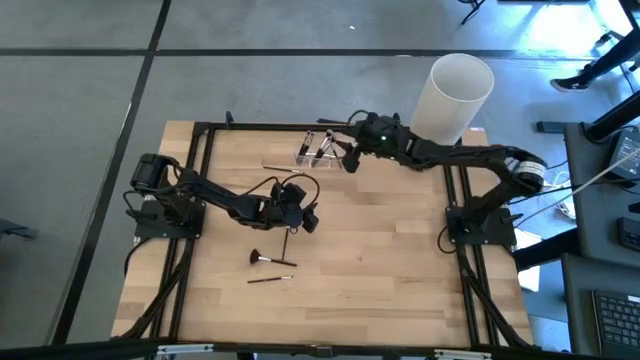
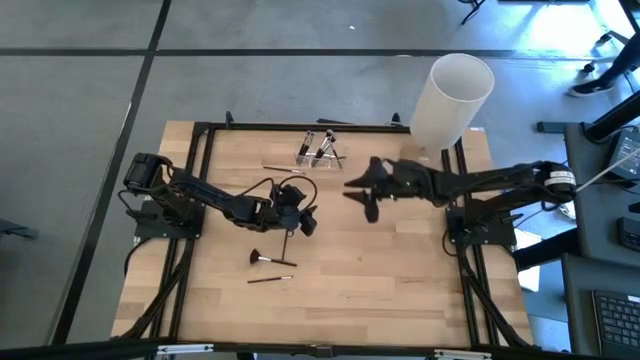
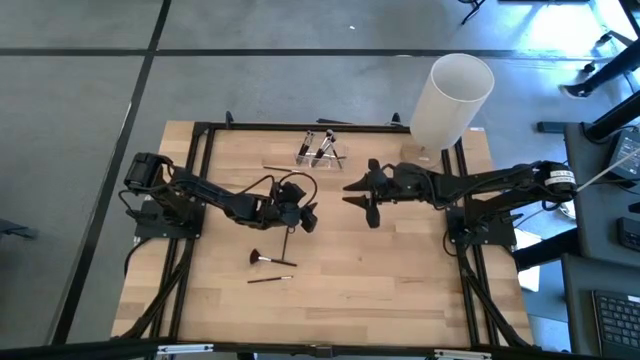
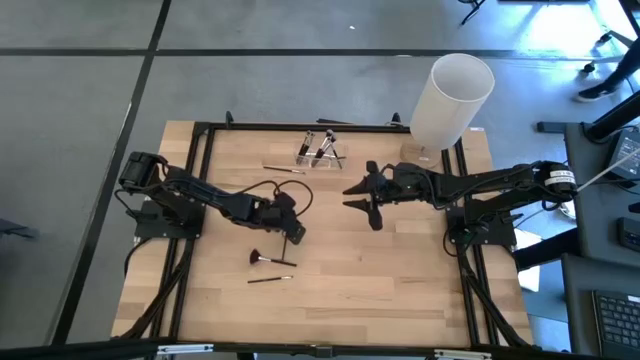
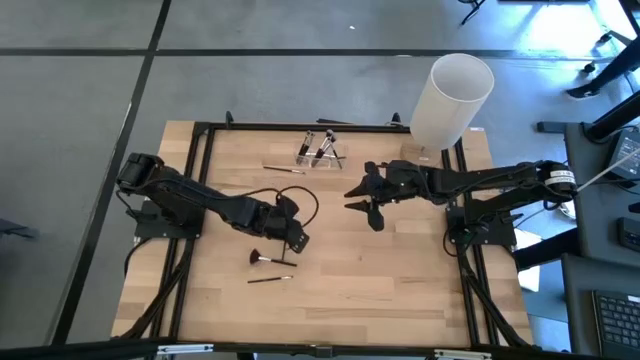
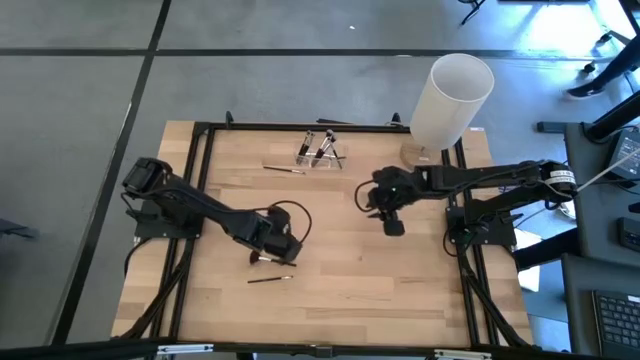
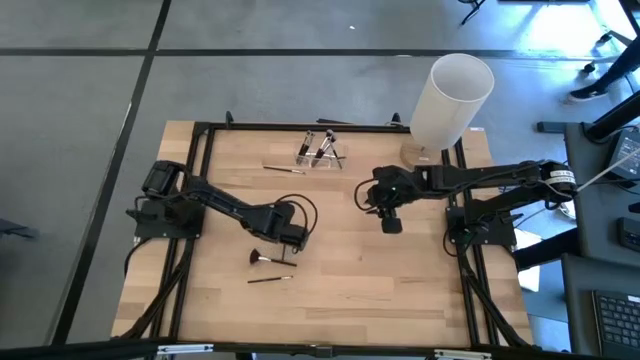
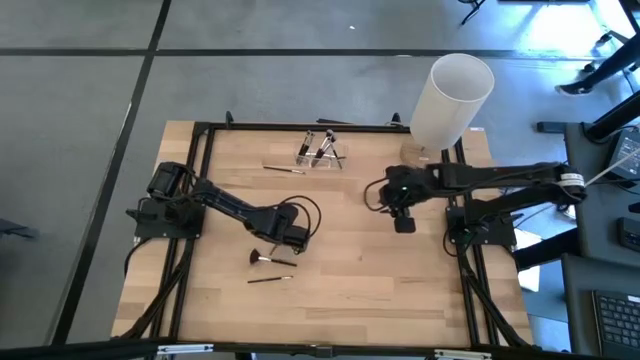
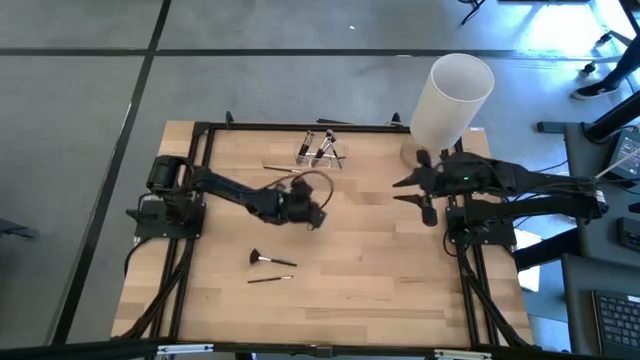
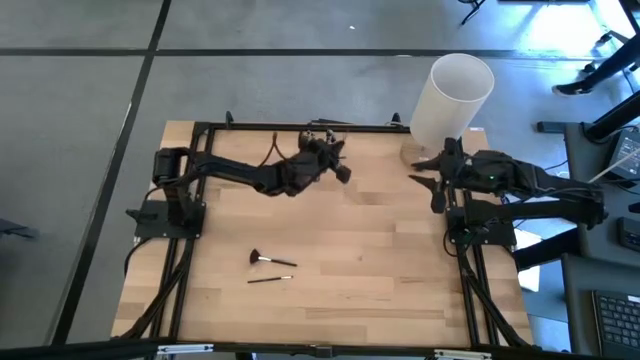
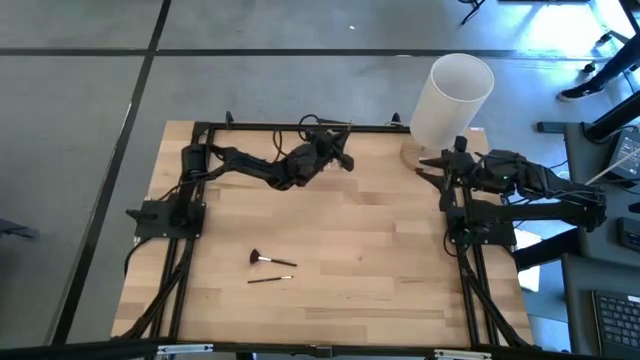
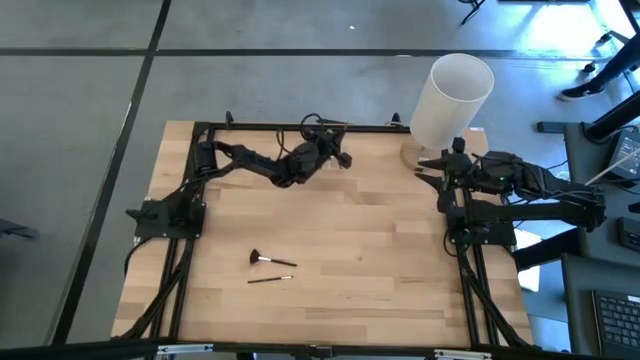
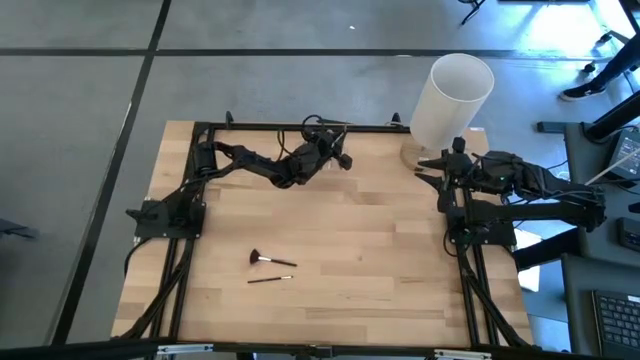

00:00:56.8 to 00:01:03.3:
Task: Pick & Place Makeup Brushes
Put the liner brush into the transparent organizer

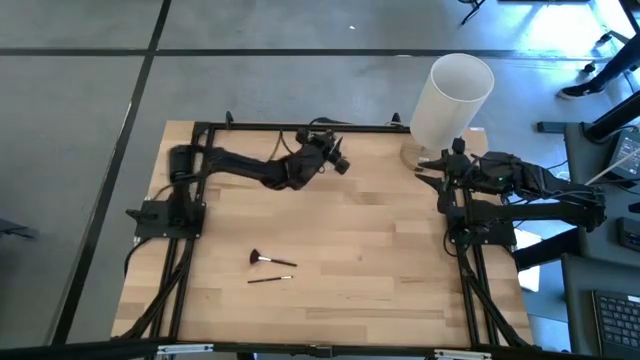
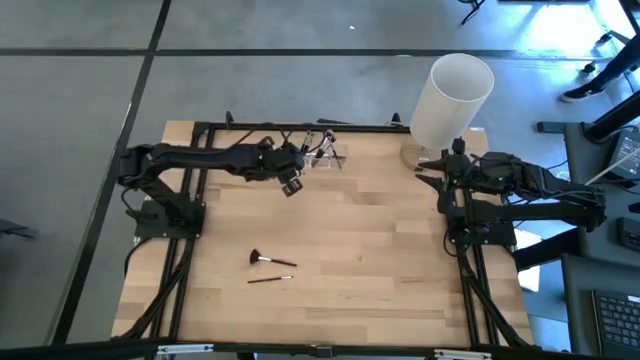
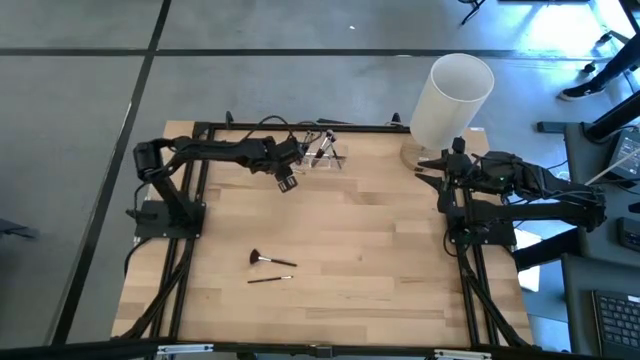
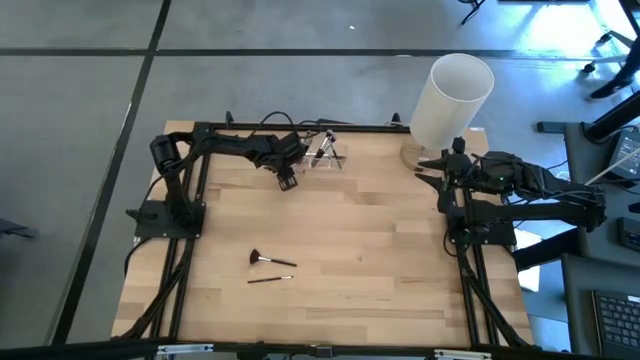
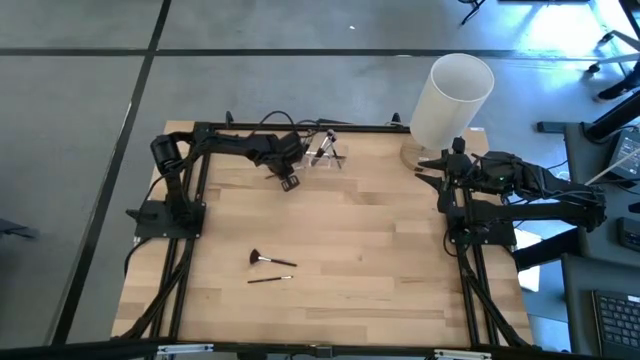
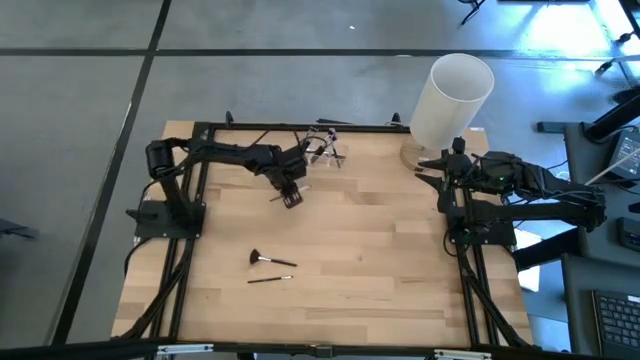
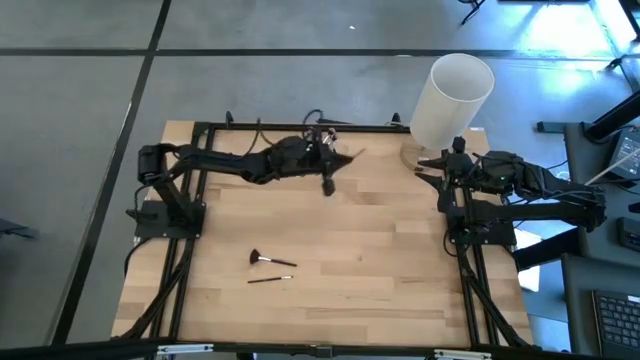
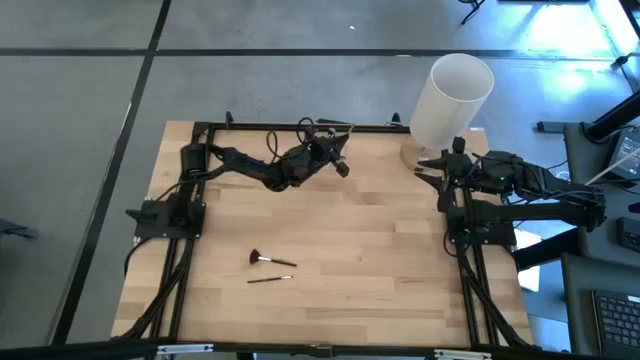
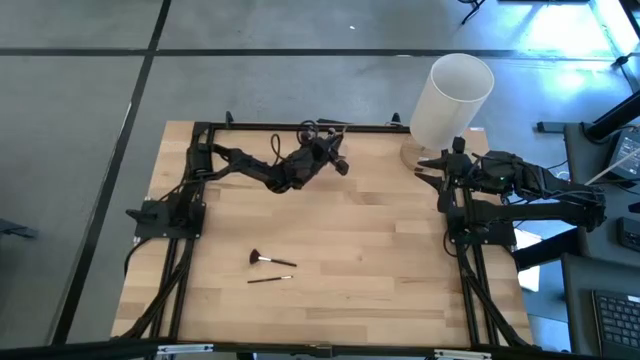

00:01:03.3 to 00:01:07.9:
Put the eyeshadow brush into the transparent organizer

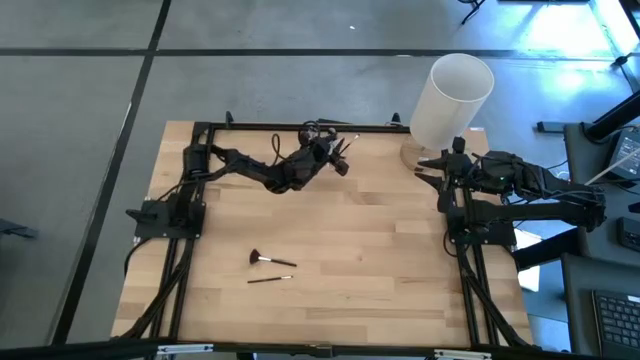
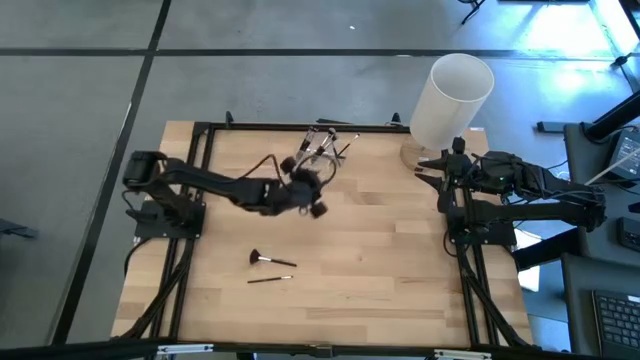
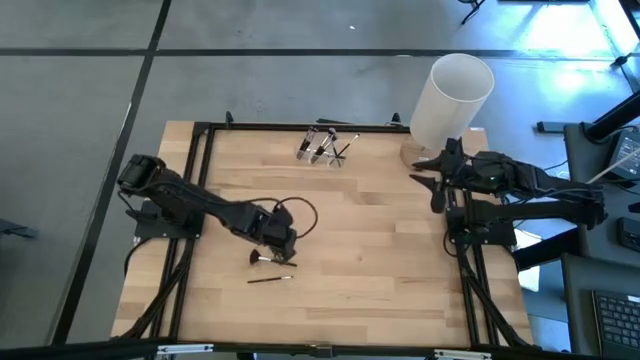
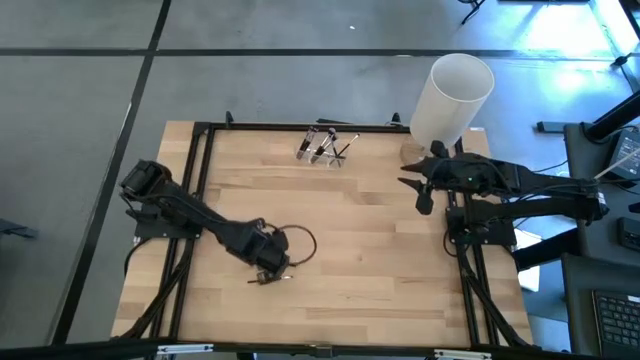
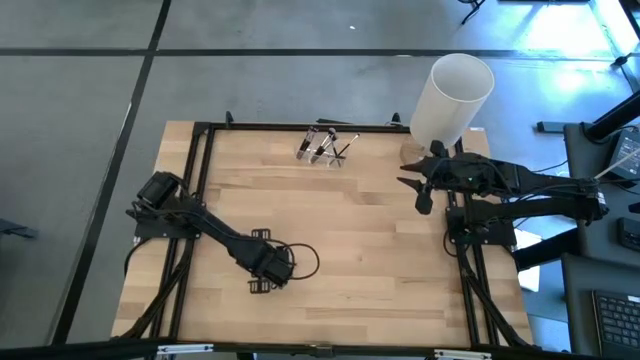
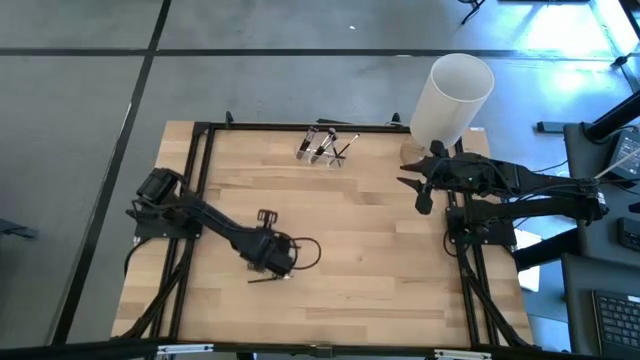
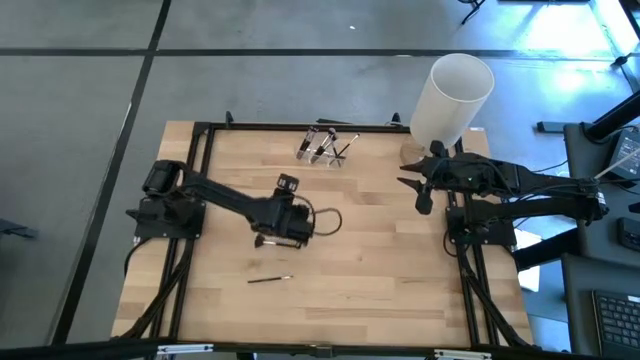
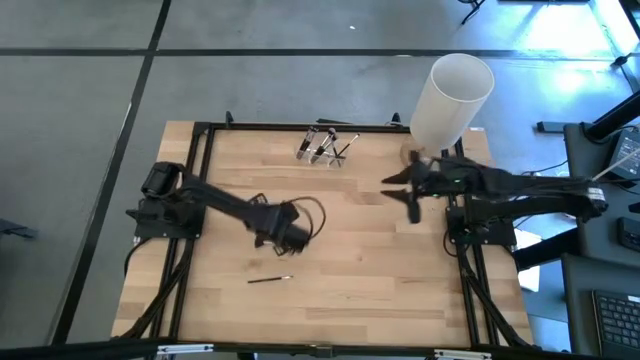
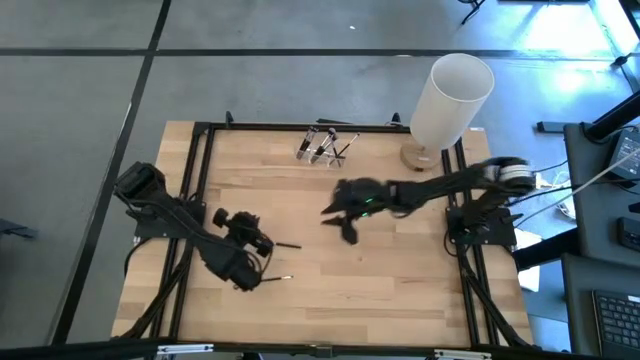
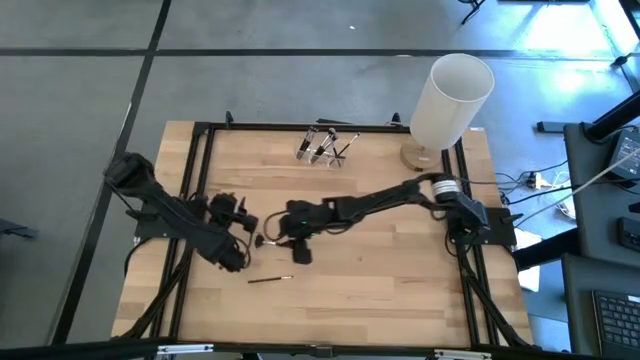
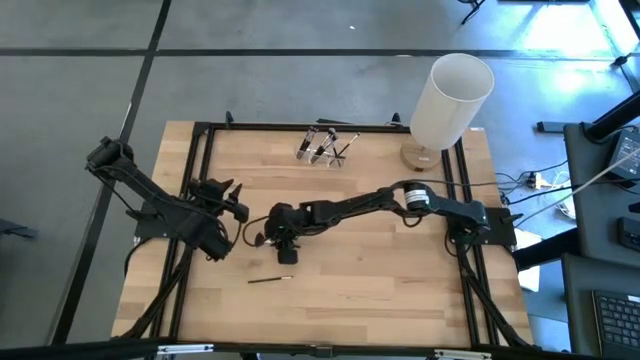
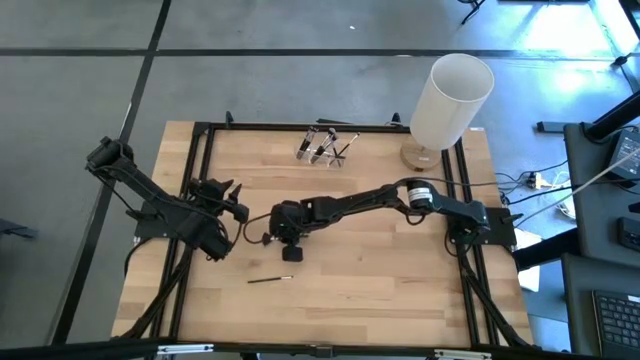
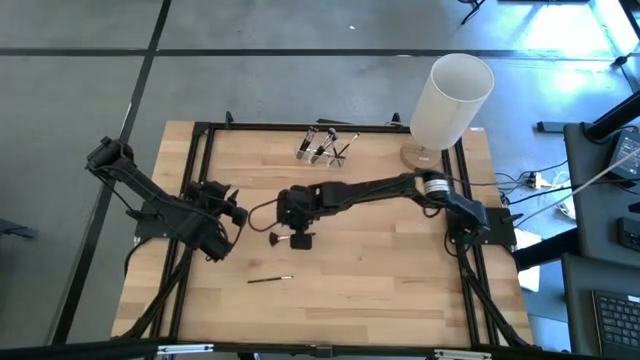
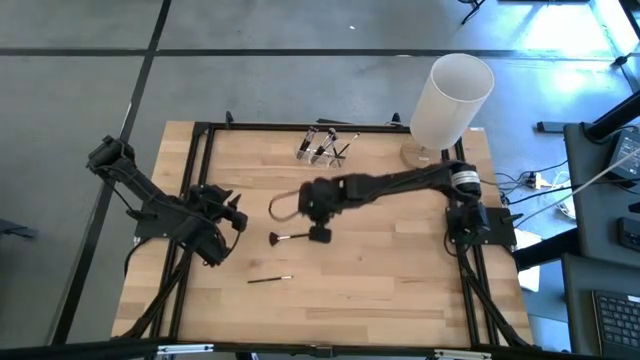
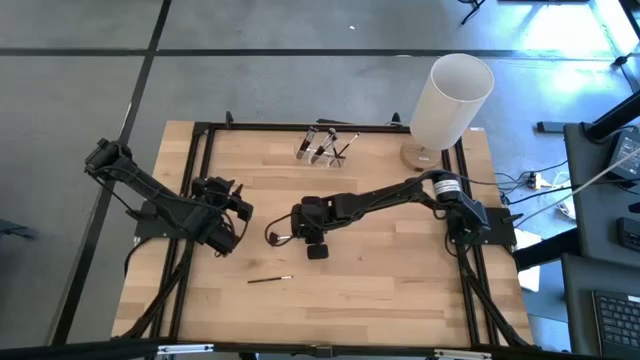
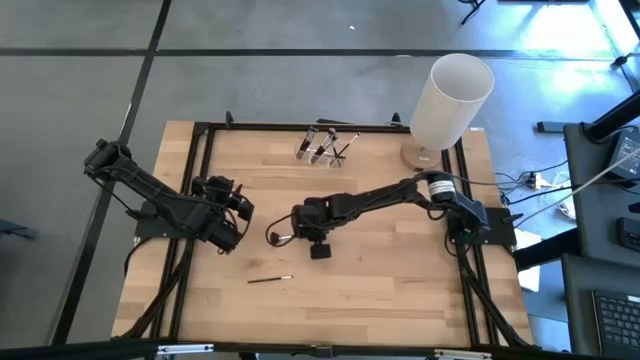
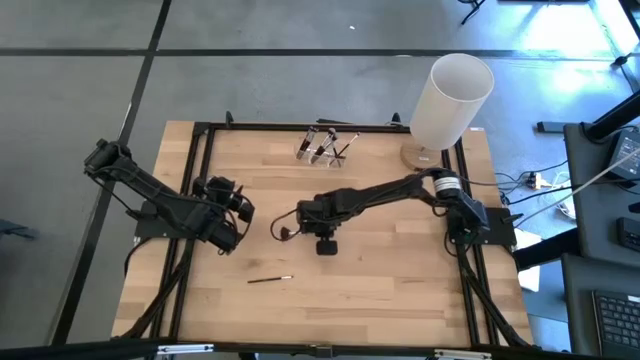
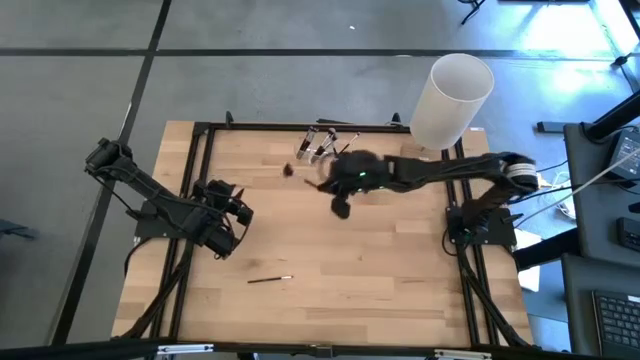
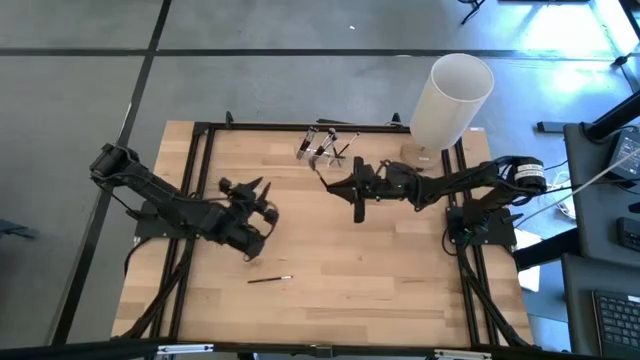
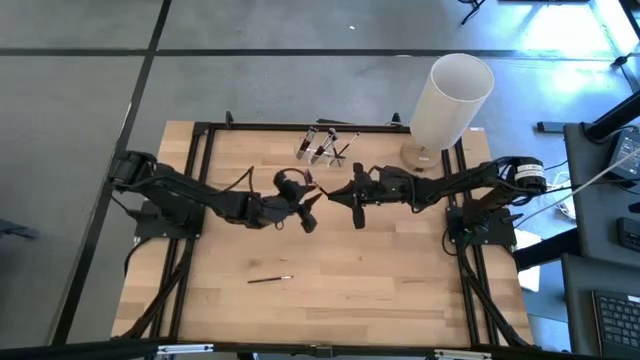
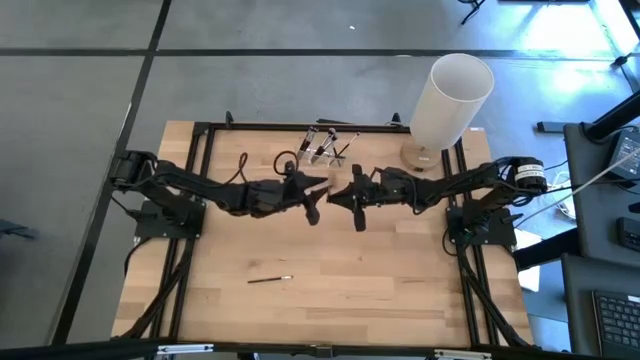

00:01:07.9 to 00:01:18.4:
Put the highlighter brush into the transparent organizer
